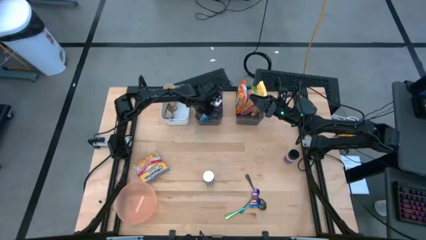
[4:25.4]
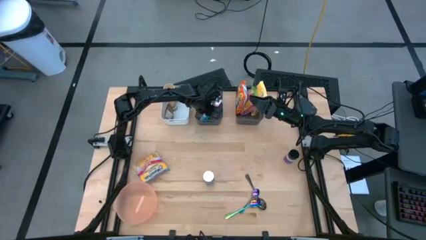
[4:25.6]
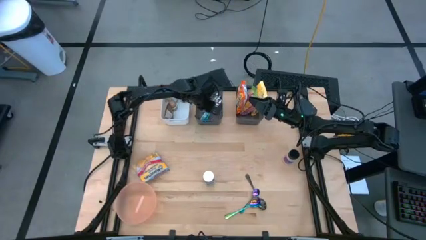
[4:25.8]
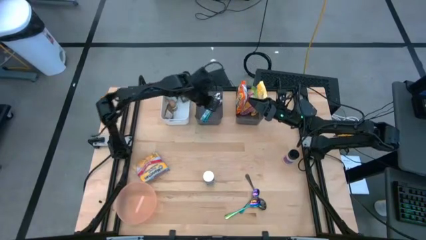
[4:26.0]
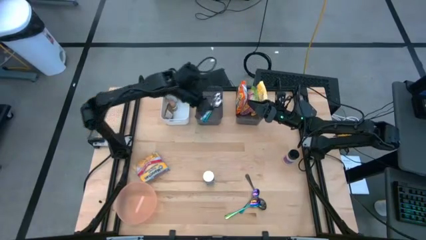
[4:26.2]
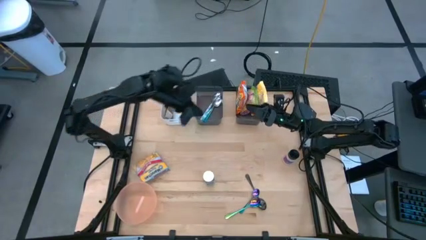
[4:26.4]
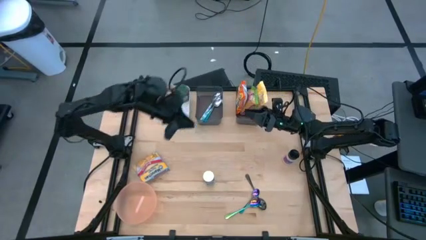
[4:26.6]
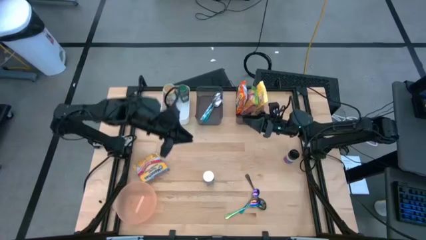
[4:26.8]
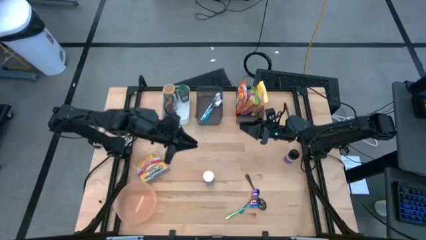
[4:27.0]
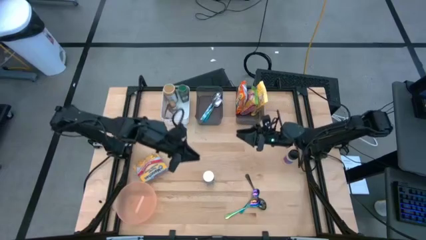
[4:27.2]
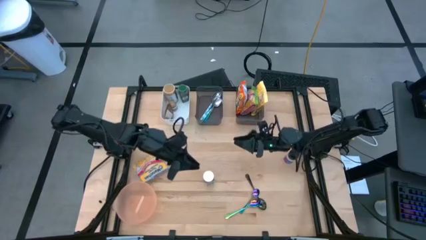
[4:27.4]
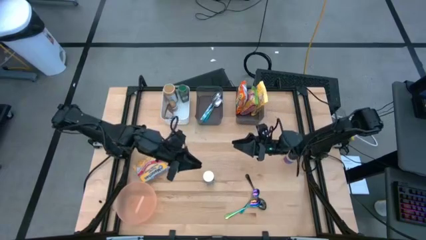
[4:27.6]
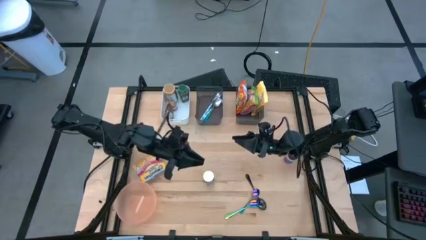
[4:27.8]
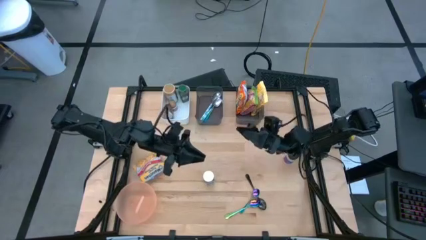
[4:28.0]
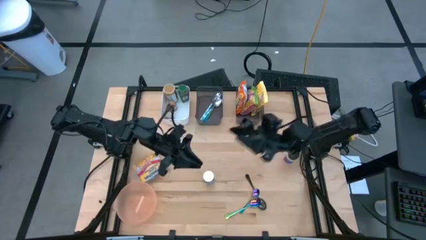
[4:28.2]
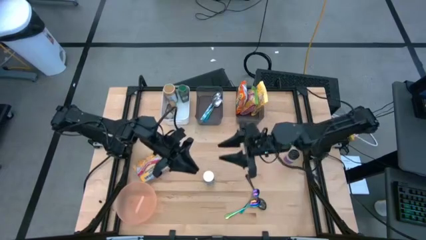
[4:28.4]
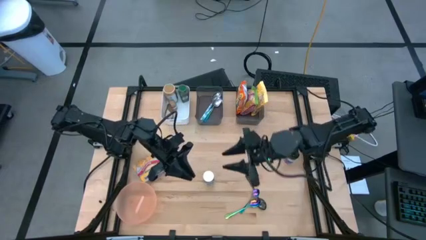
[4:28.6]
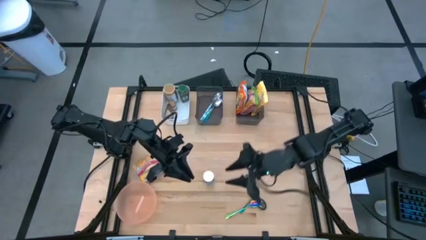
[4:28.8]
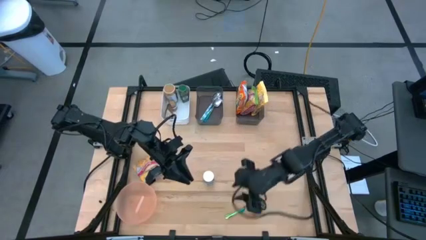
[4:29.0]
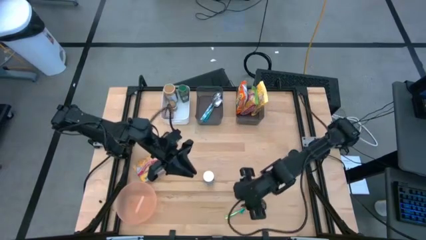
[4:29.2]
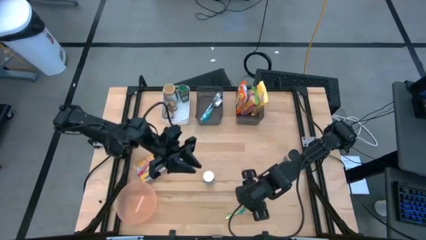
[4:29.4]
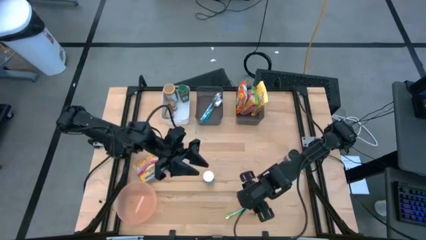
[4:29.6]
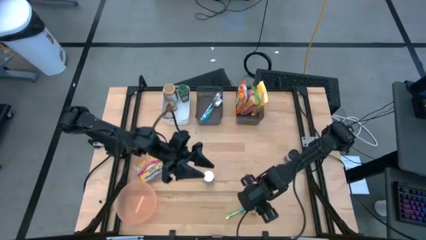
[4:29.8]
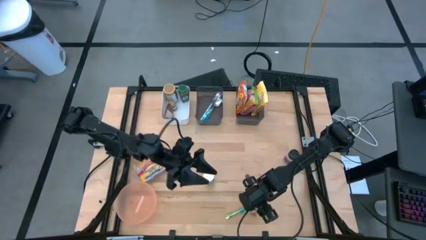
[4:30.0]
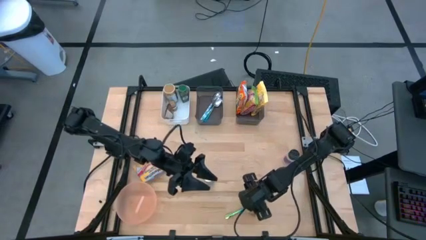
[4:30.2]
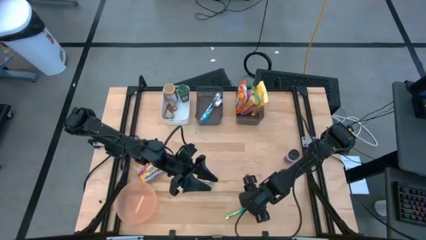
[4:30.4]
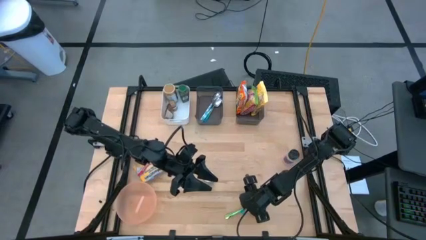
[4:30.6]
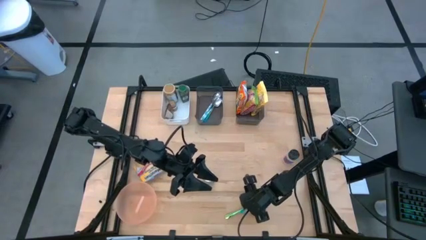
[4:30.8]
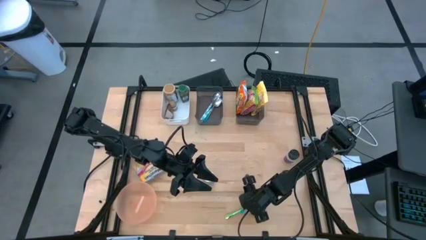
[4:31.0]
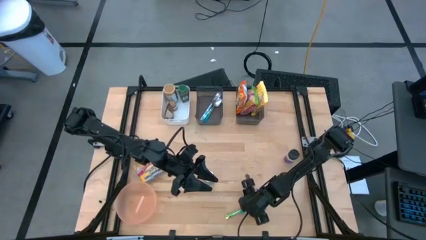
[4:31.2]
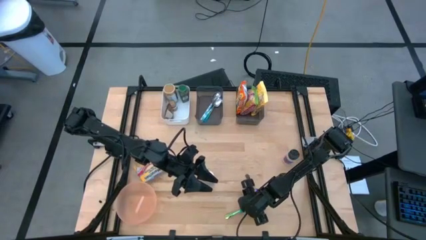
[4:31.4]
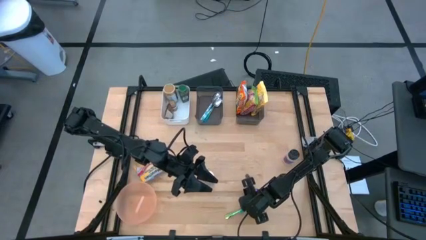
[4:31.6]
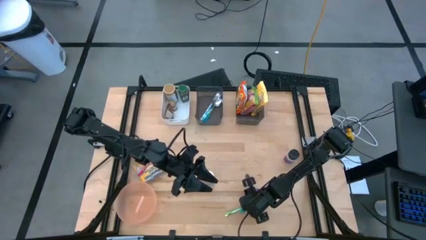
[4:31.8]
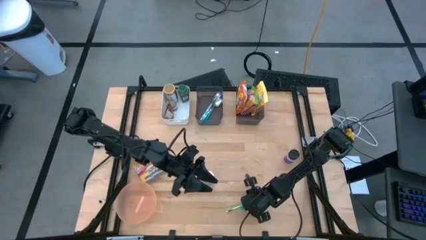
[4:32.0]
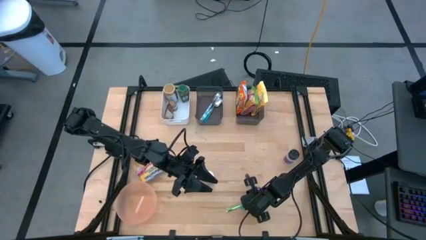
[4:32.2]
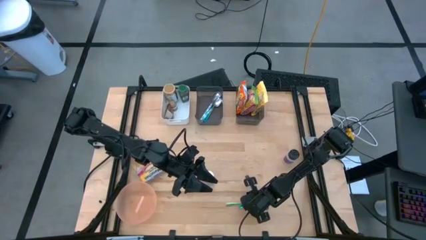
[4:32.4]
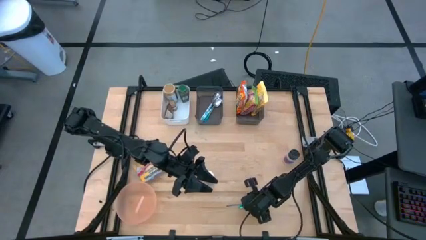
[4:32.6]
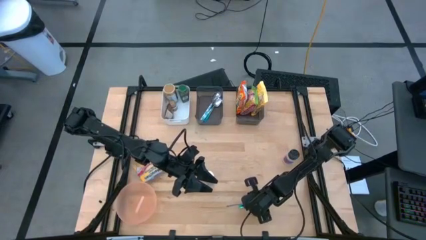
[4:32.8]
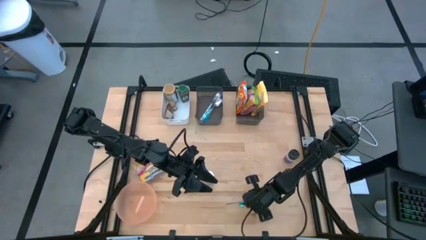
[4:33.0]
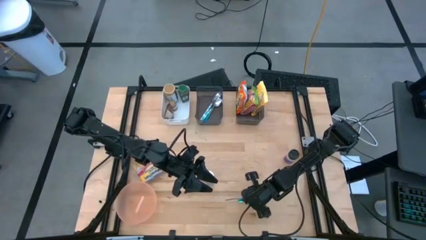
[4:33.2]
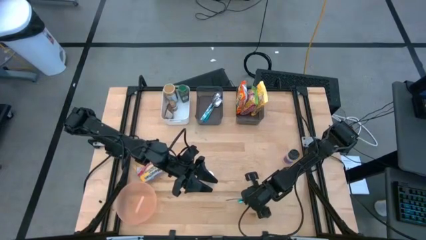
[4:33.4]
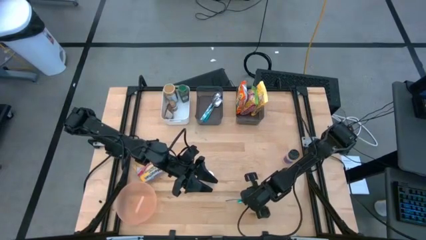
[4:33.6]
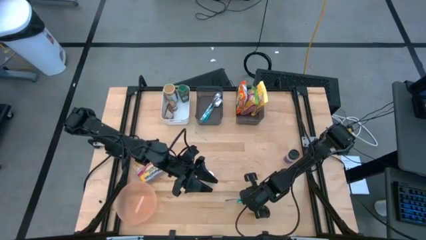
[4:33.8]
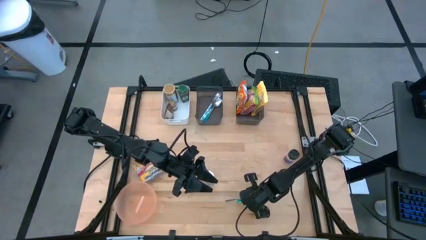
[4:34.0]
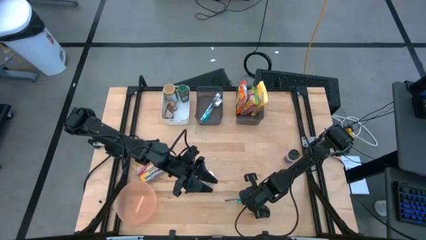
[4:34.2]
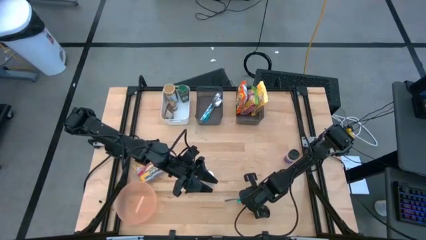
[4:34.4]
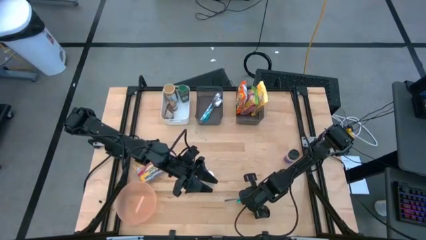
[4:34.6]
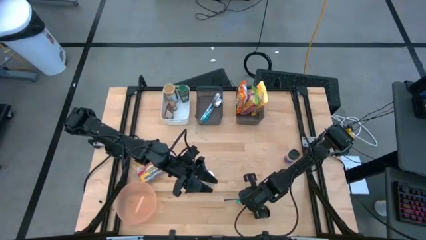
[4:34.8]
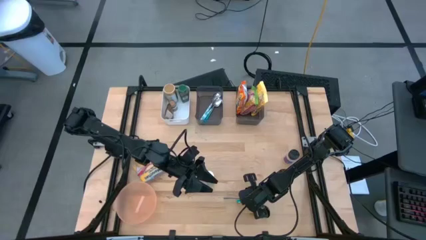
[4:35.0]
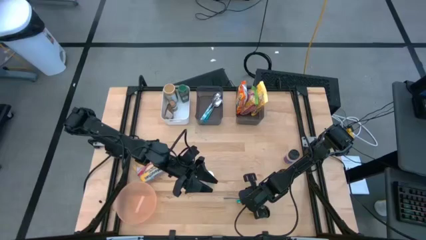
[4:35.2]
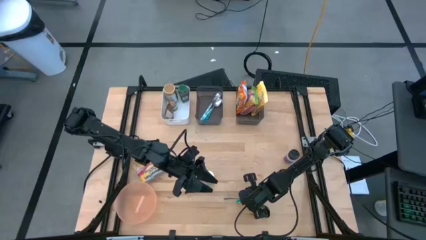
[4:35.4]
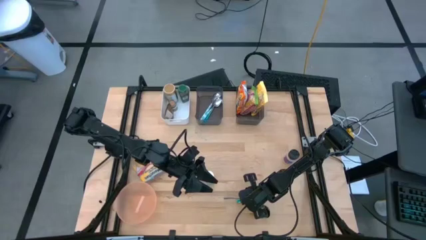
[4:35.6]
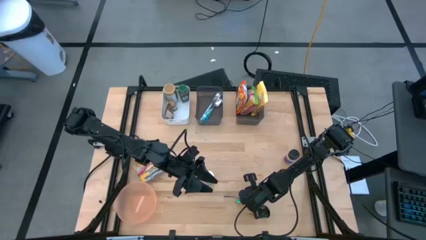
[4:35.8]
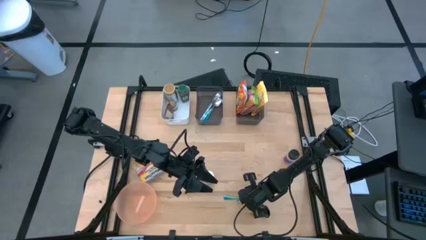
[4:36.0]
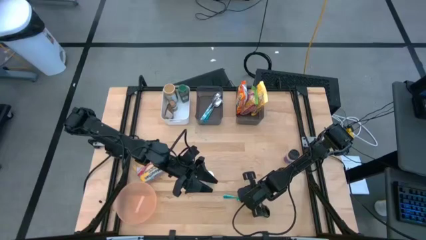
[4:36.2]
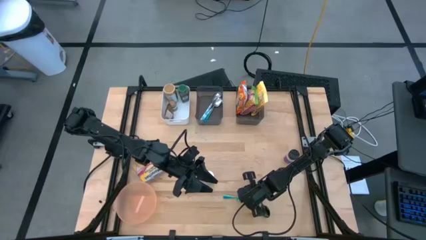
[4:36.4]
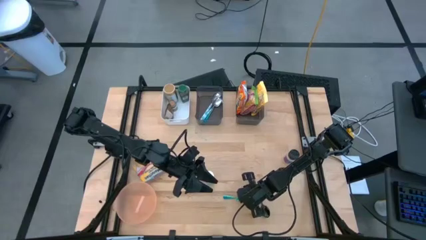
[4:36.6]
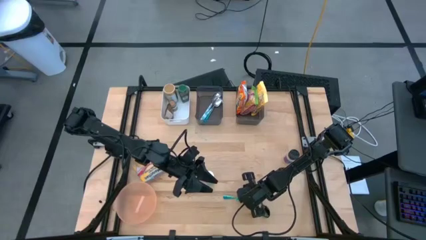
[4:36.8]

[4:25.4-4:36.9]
Task: Pick & Place Food Item
Put the left violet spoon into the left black bin

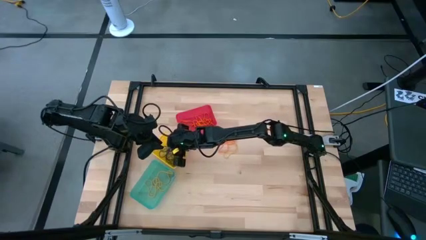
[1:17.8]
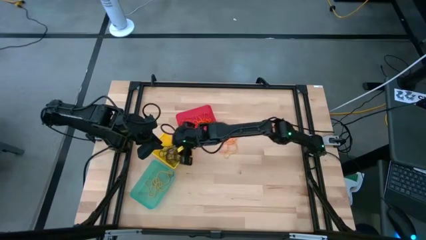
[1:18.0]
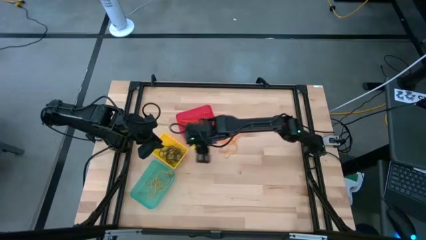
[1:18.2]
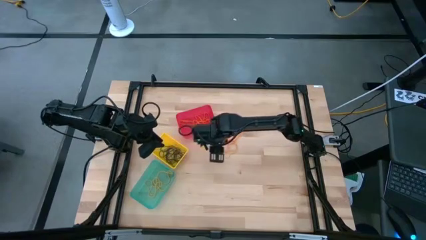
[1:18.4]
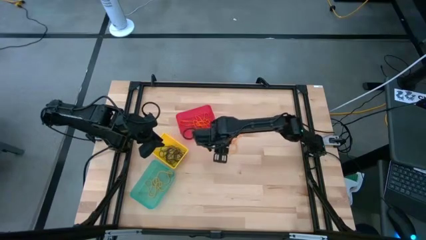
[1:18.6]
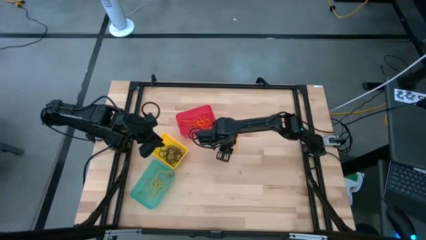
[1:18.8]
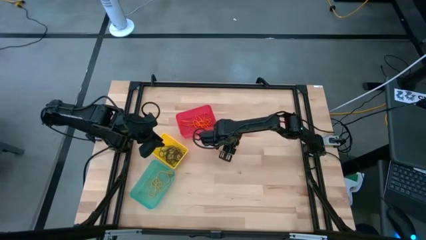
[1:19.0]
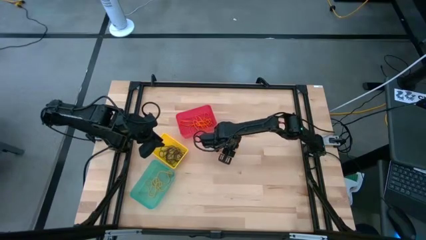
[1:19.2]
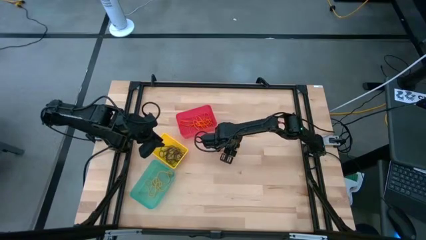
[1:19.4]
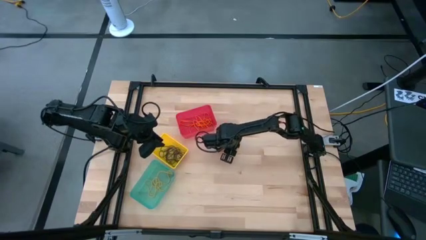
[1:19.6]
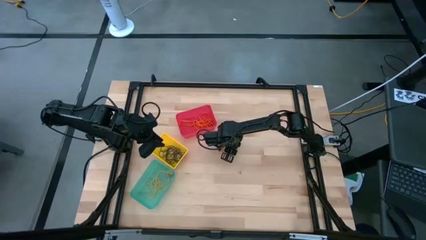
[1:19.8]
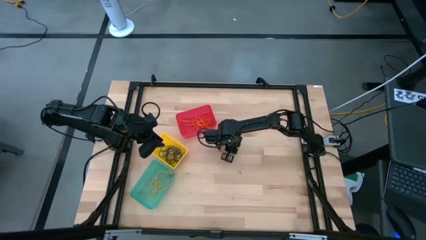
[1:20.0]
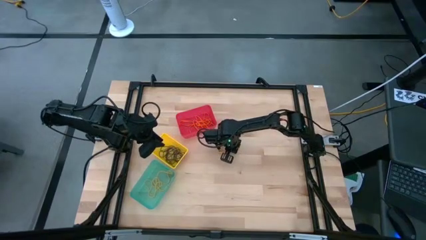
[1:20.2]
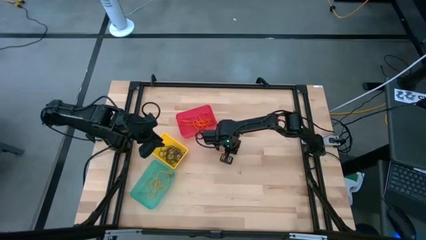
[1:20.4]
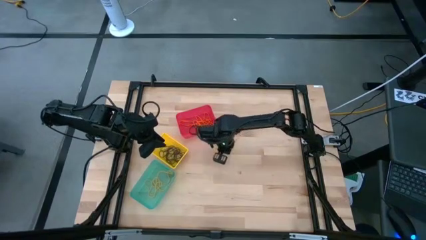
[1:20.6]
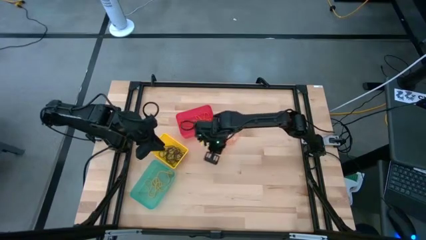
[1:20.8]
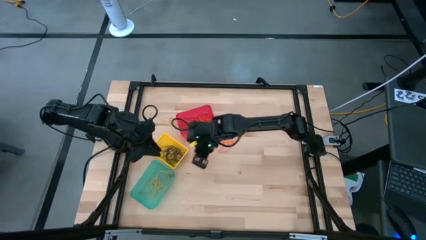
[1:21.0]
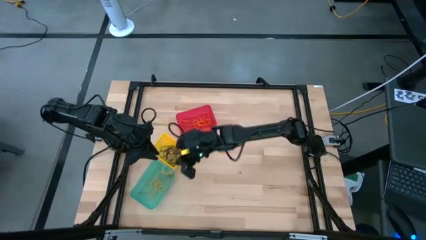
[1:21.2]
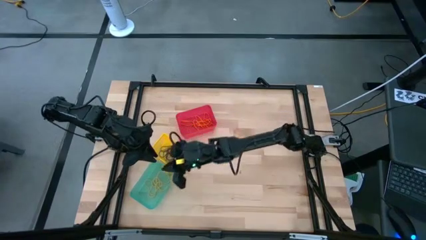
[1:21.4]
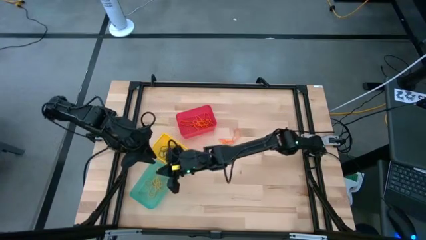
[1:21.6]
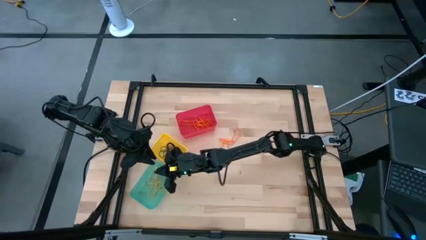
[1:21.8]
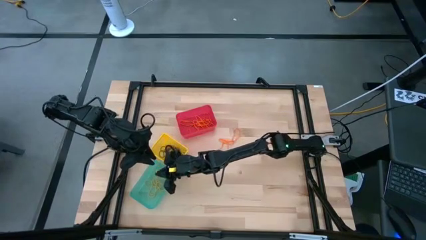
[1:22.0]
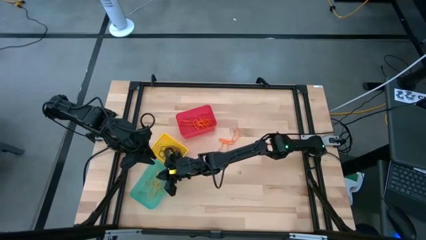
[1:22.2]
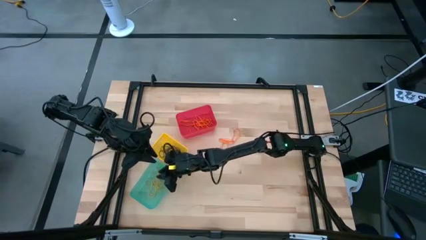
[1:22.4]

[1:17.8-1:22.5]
Task: Sort rubber bands into baskets
Put the yellow rubber band into the light blue bin
